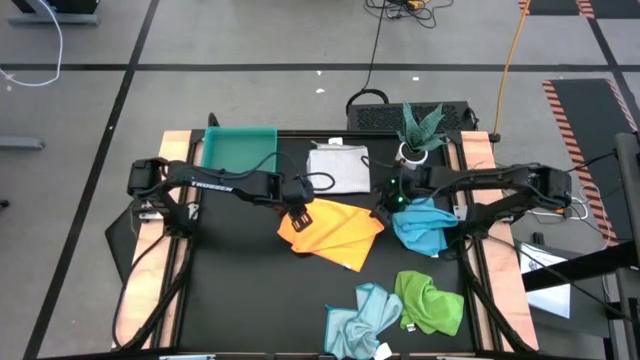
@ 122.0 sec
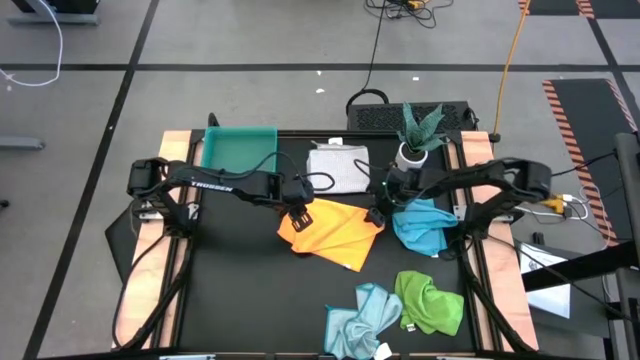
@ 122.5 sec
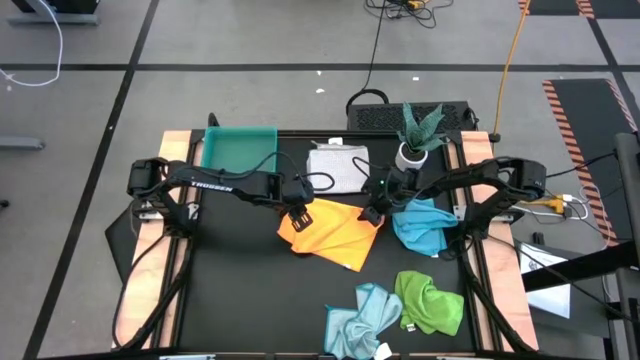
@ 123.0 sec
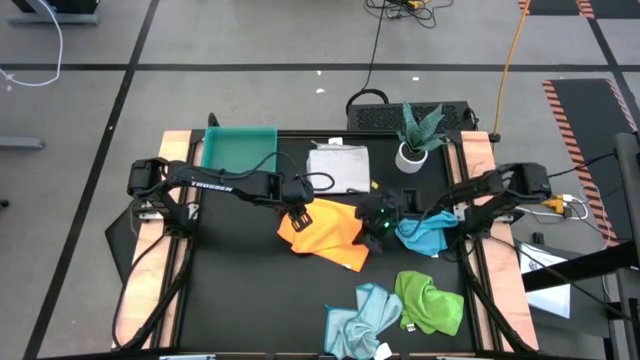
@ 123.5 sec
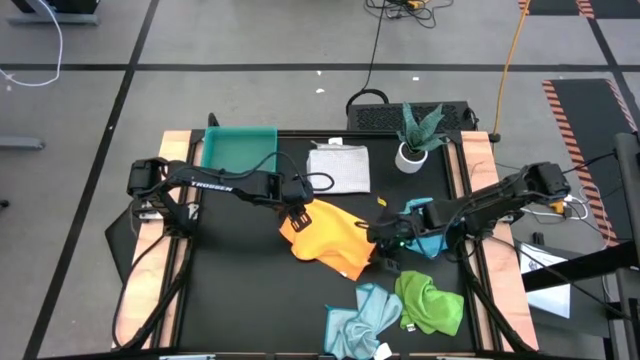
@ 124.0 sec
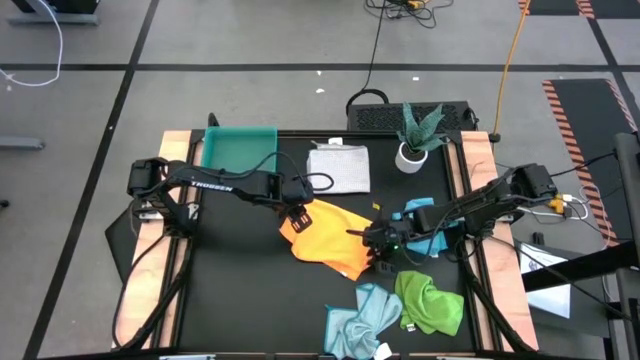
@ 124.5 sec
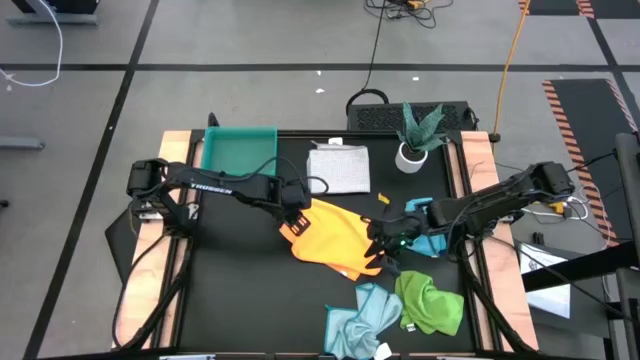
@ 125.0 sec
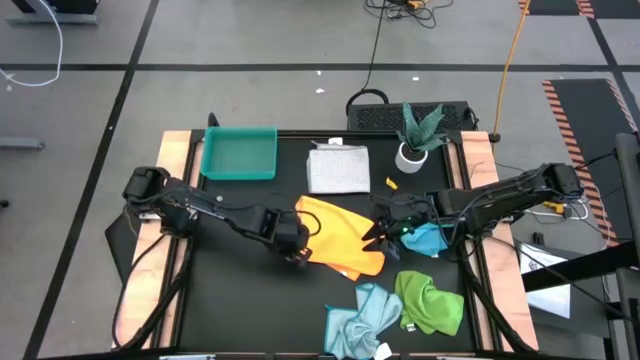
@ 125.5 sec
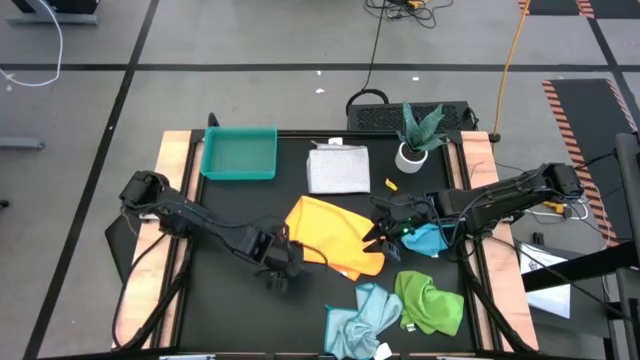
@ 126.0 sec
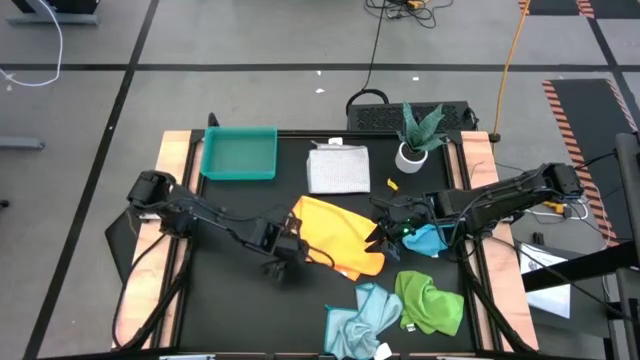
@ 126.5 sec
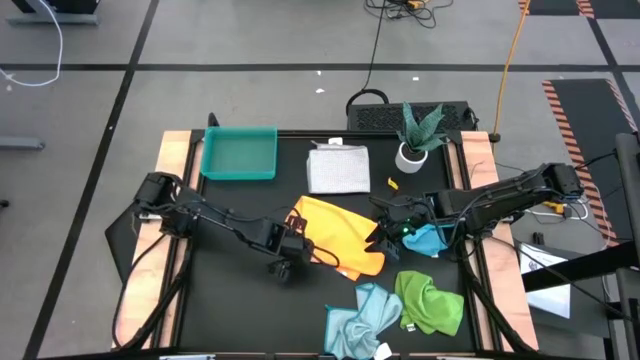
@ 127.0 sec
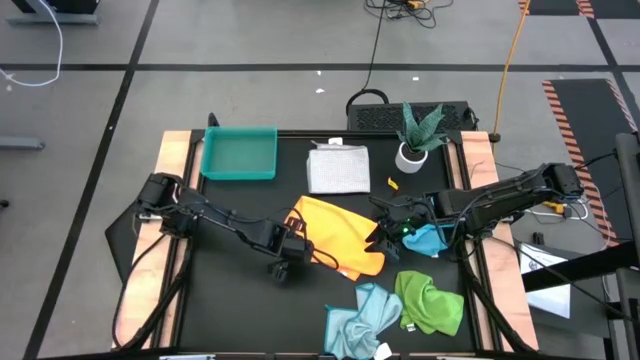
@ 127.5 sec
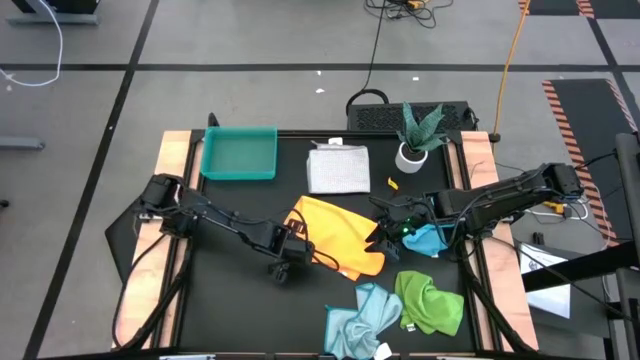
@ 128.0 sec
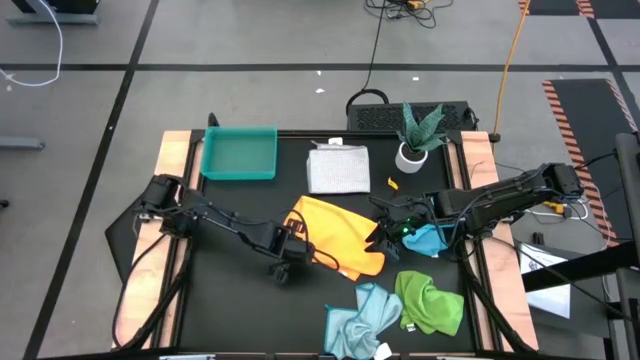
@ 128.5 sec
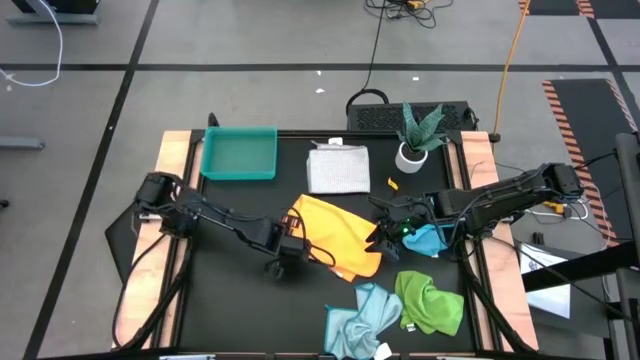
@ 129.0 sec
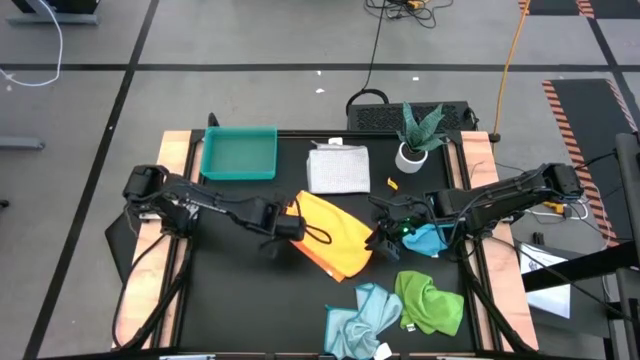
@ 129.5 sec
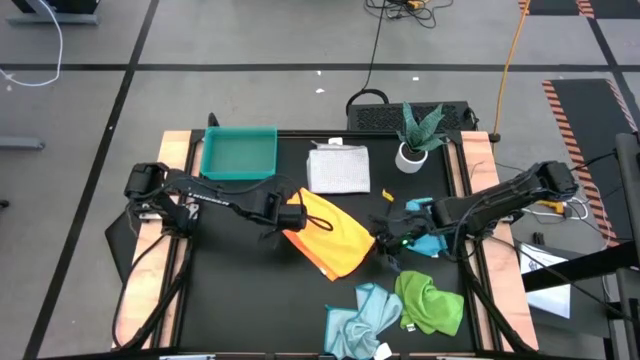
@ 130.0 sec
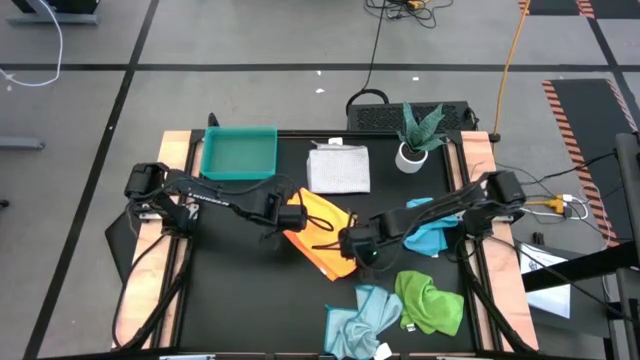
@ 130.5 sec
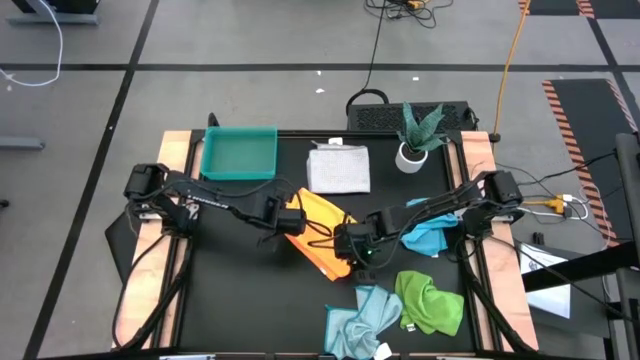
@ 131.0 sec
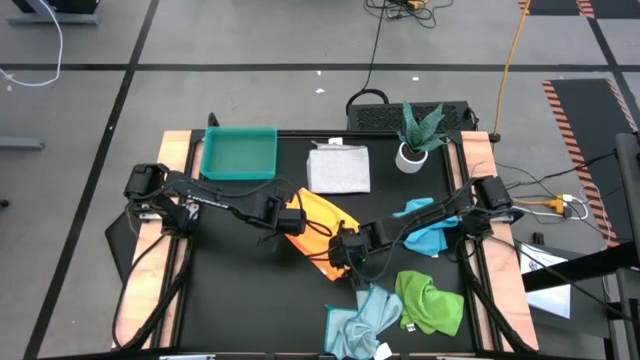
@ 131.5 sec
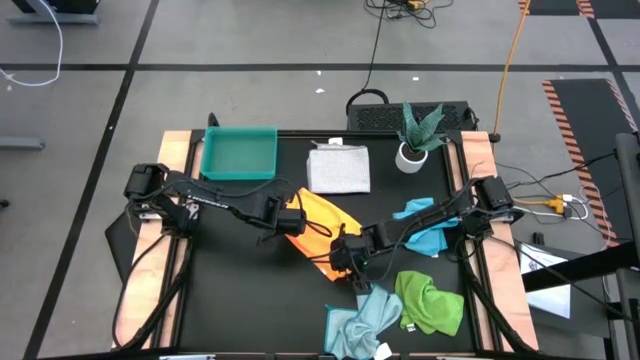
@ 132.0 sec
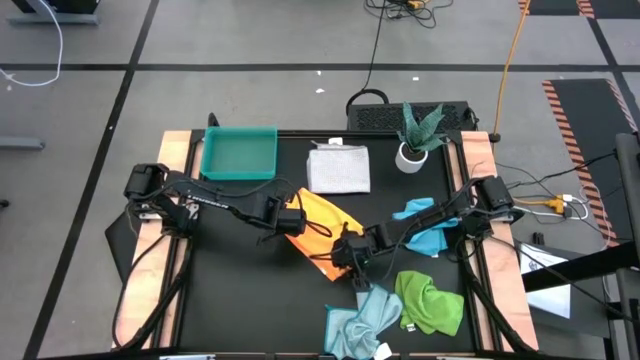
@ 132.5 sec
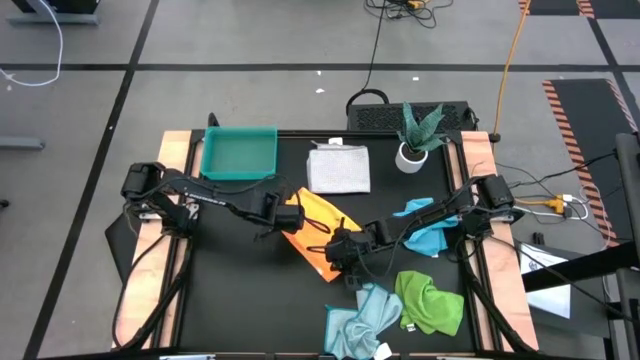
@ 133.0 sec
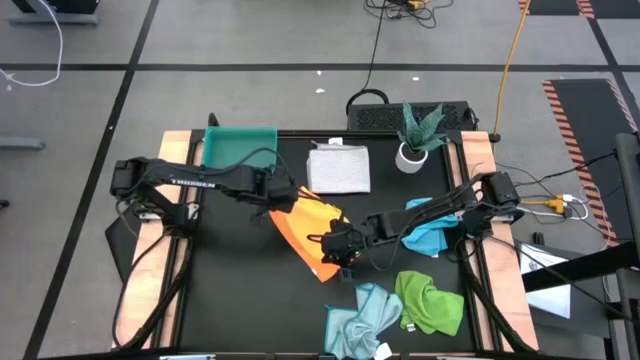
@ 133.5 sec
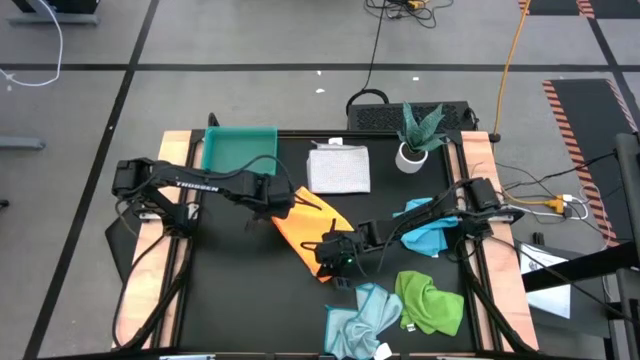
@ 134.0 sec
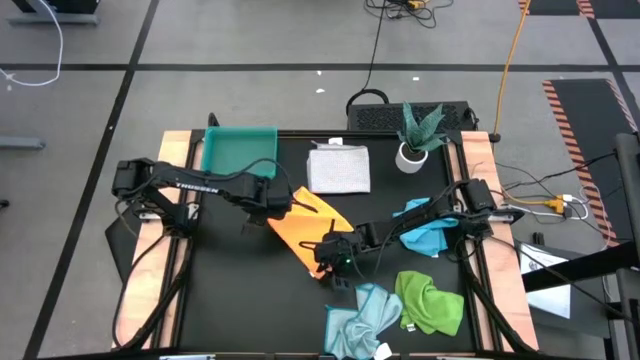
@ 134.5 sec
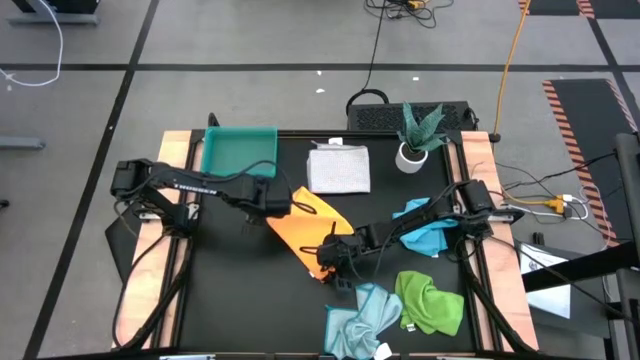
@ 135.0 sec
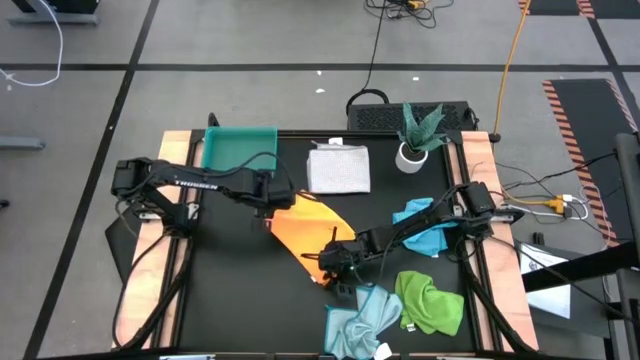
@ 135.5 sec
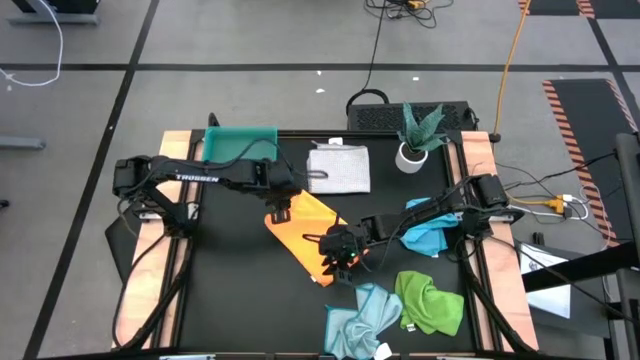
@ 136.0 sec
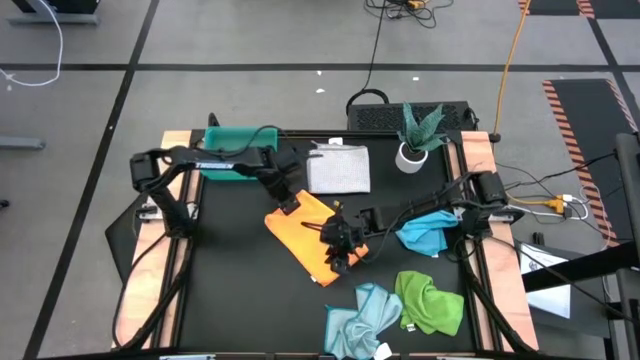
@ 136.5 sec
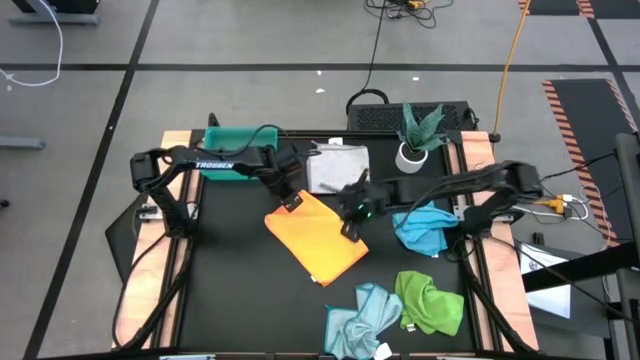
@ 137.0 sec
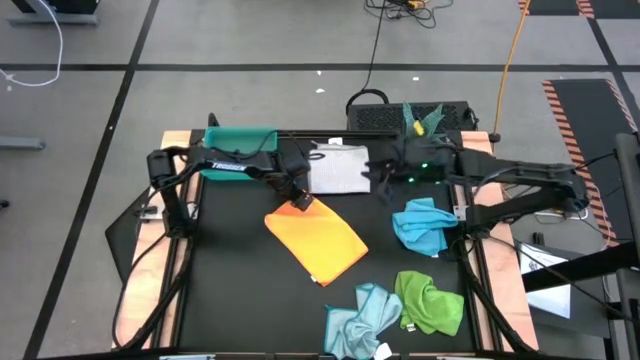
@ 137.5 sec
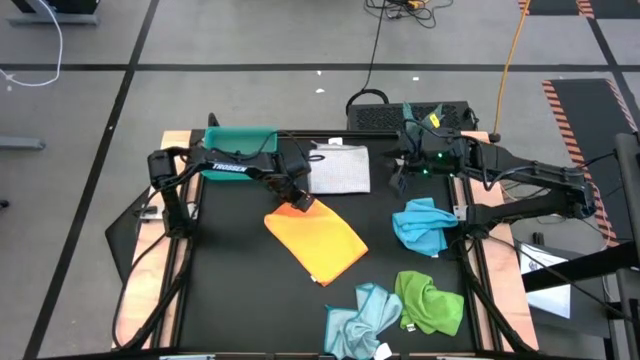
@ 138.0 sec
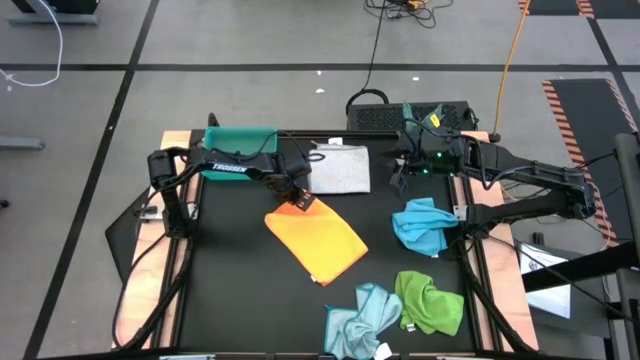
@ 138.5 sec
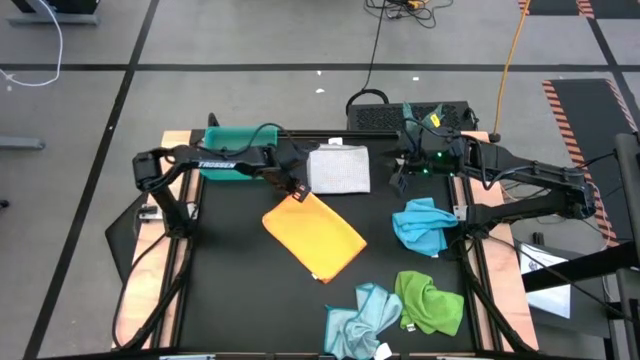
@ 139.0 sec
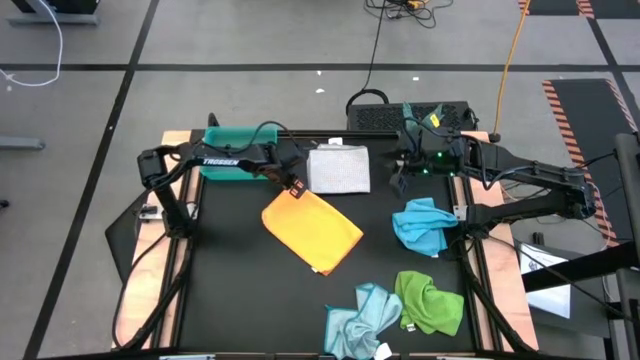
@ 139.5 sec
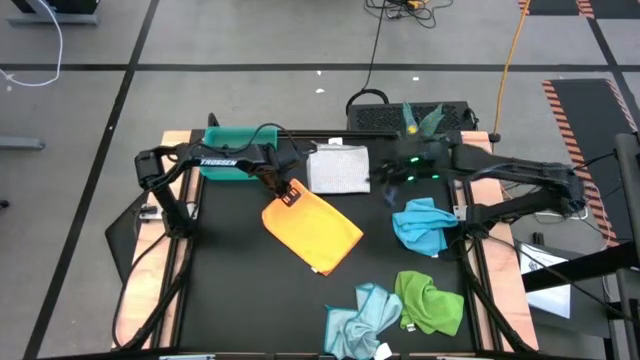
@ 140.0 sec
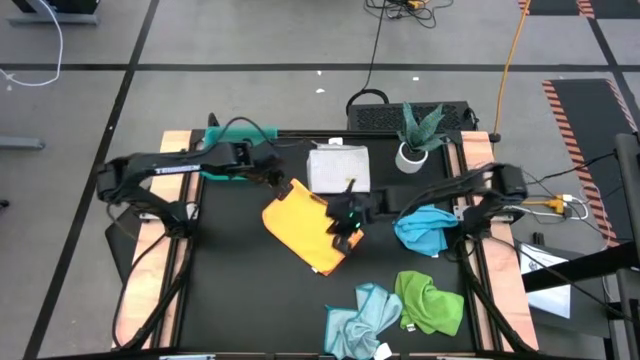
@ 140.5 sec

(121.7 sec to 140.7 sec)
Task: Fold microfiber towels
Fold the orange microfiber towel

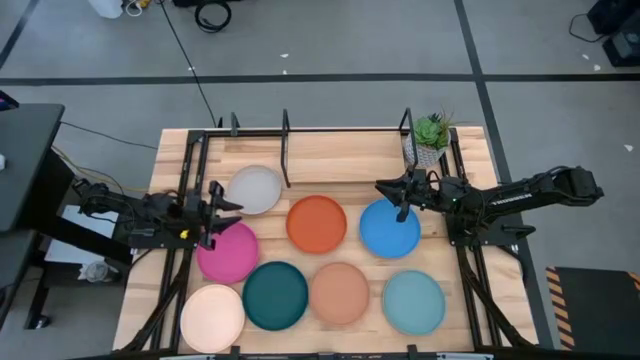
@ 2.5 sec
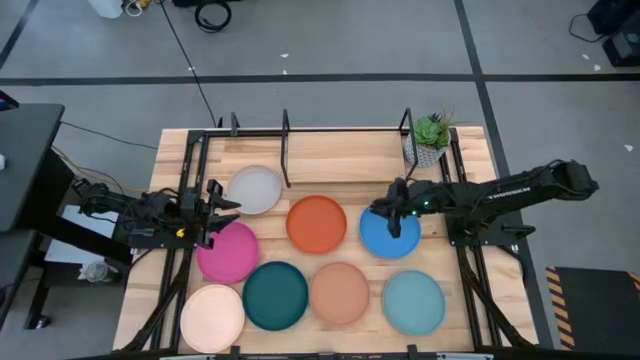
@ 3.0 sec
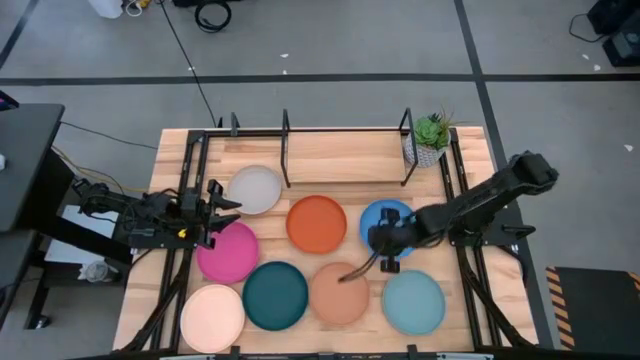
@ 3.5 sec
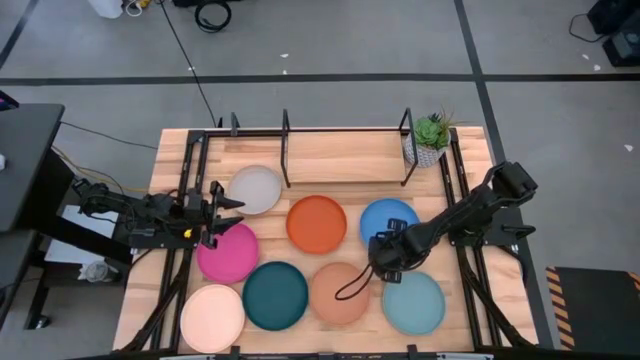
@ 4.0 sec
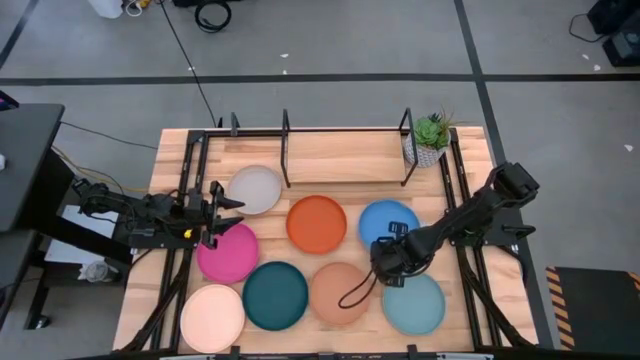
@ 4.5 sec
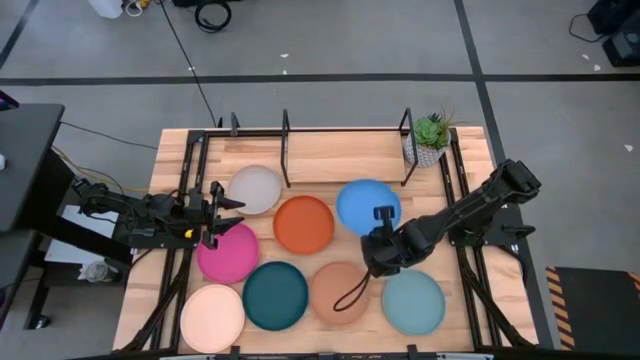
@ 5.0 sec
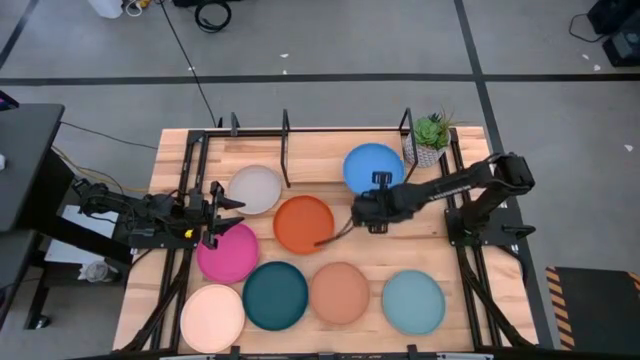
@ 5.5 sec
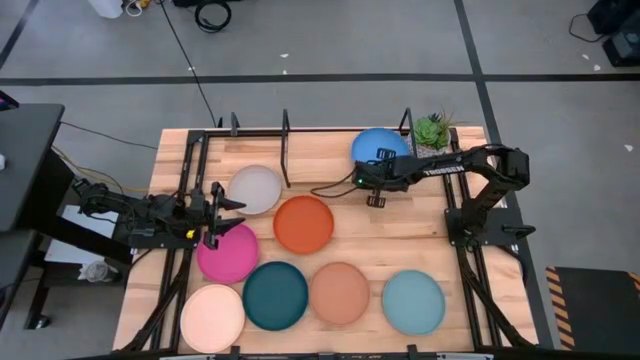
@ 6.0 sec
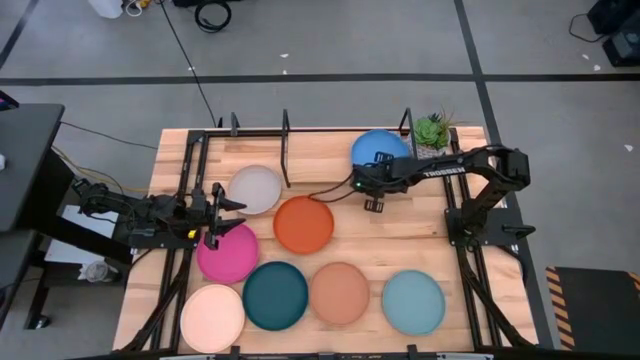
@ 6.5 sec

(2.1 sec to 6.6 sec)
Task: Place and stack plates onto a shelf
Put the blue plate on the shelf
